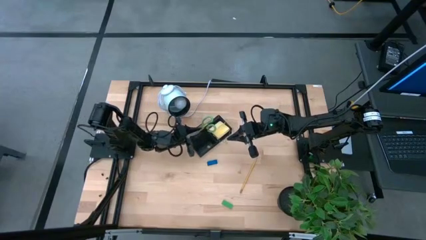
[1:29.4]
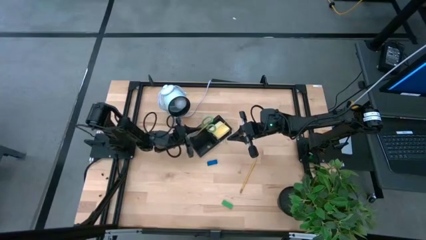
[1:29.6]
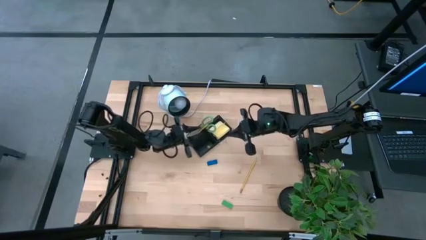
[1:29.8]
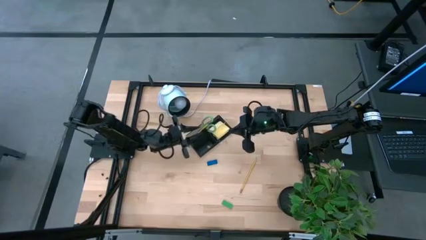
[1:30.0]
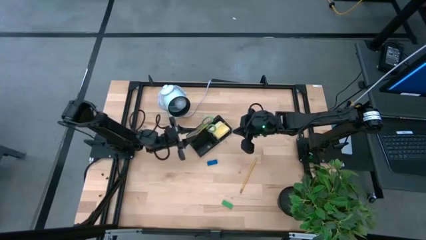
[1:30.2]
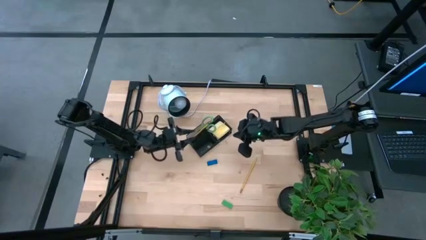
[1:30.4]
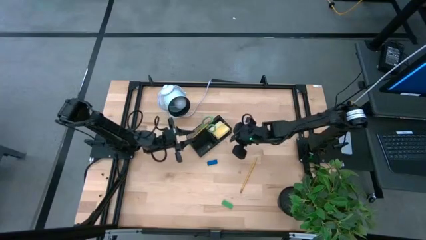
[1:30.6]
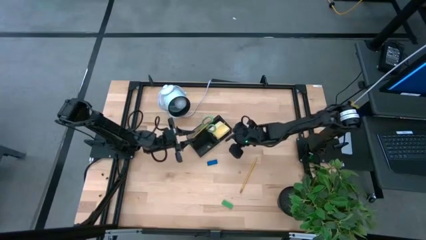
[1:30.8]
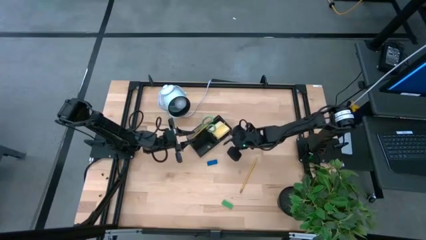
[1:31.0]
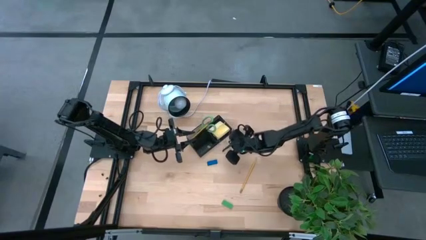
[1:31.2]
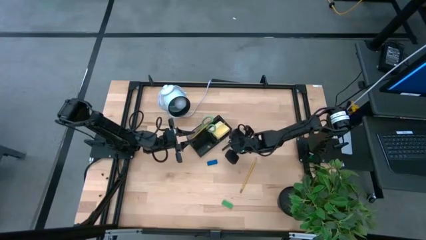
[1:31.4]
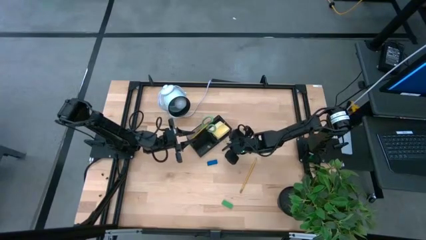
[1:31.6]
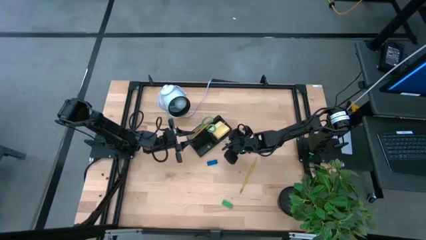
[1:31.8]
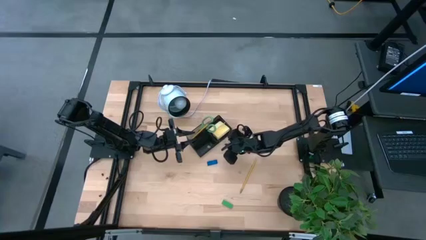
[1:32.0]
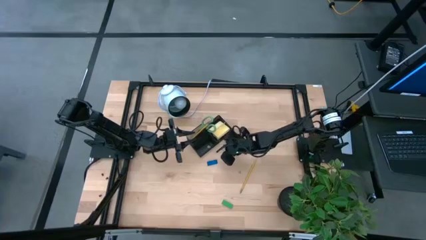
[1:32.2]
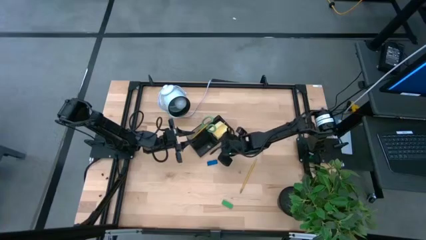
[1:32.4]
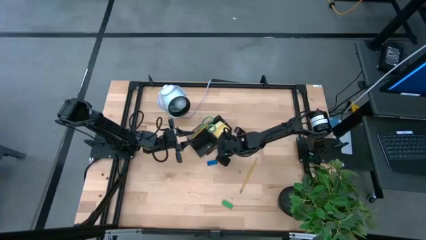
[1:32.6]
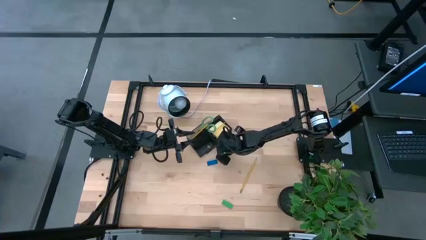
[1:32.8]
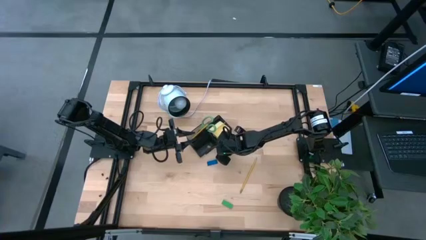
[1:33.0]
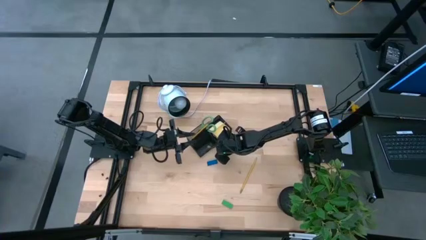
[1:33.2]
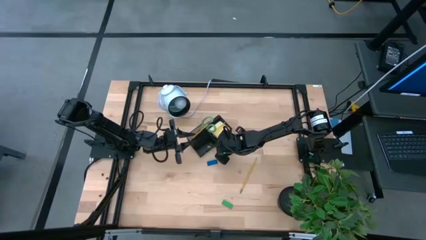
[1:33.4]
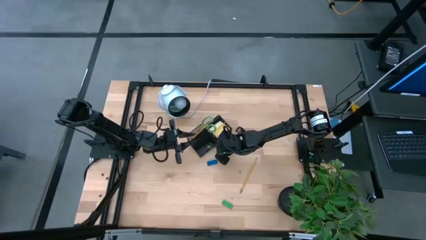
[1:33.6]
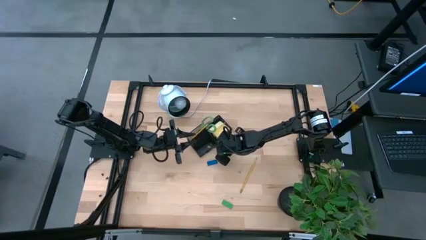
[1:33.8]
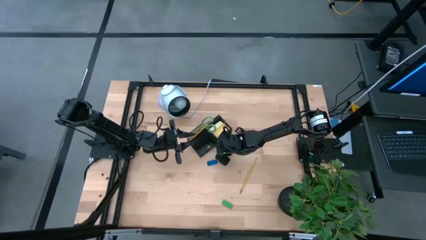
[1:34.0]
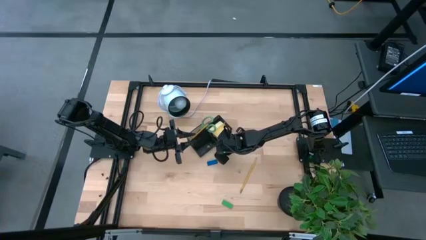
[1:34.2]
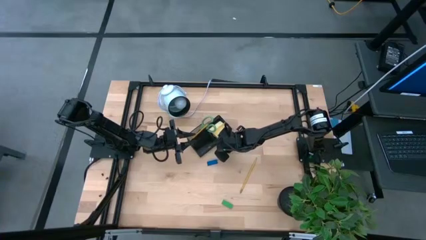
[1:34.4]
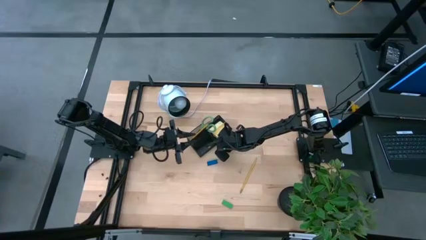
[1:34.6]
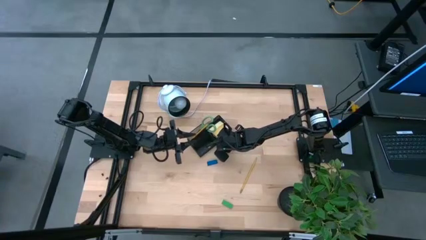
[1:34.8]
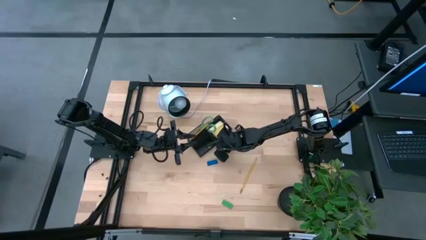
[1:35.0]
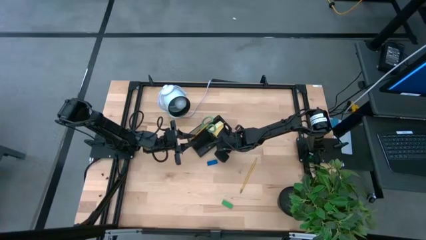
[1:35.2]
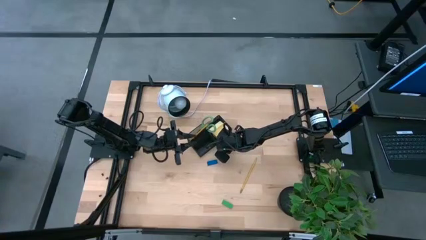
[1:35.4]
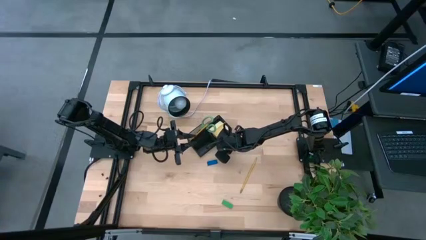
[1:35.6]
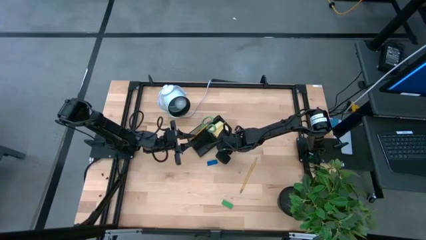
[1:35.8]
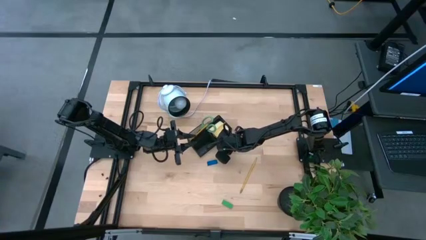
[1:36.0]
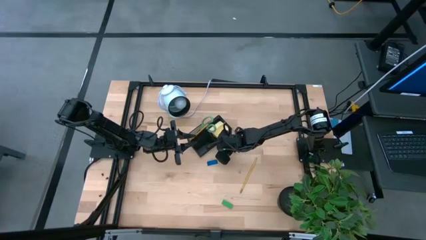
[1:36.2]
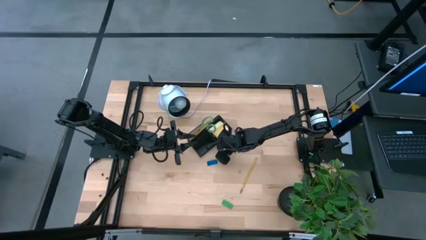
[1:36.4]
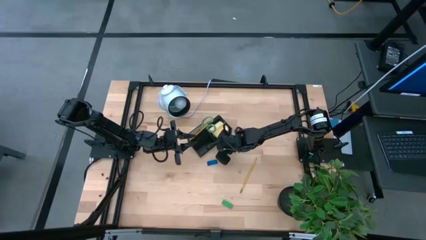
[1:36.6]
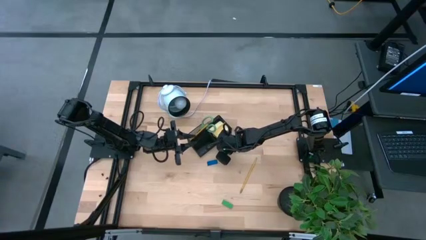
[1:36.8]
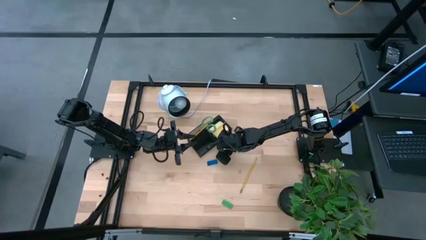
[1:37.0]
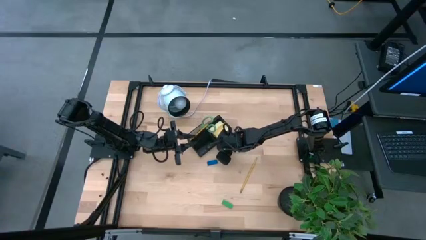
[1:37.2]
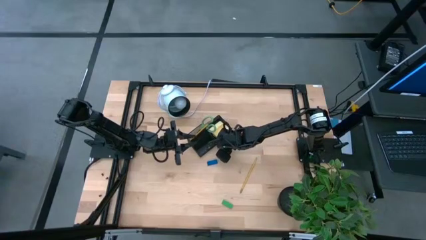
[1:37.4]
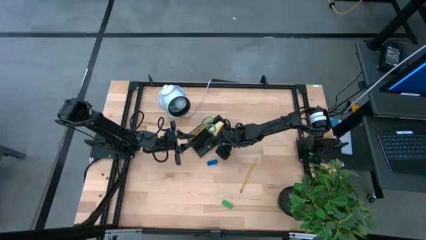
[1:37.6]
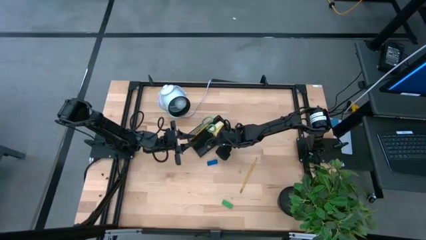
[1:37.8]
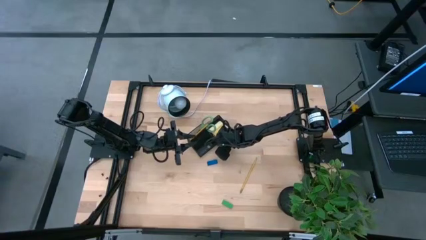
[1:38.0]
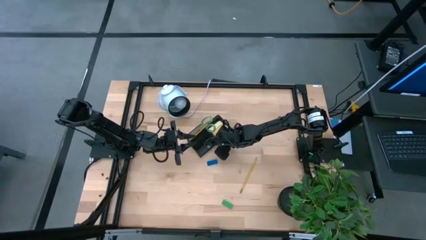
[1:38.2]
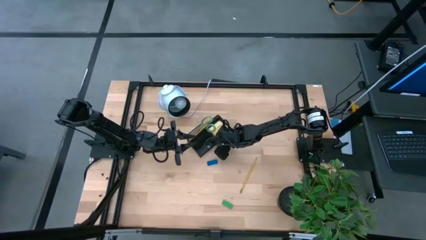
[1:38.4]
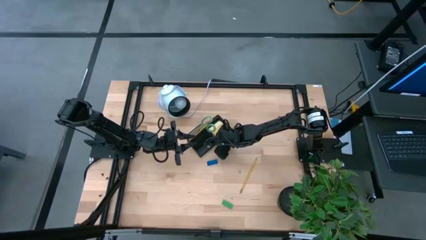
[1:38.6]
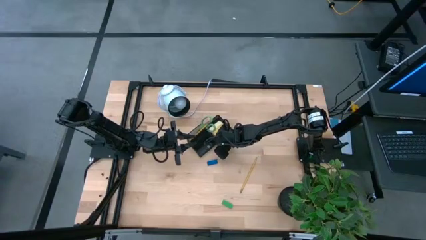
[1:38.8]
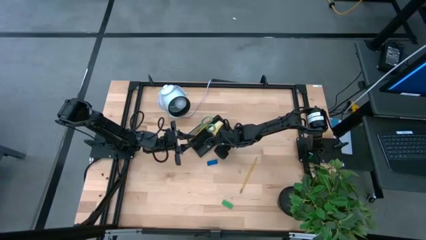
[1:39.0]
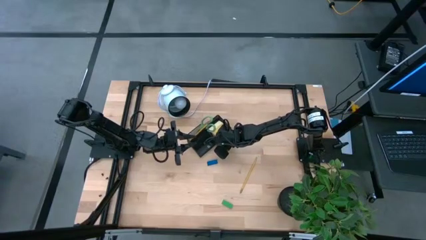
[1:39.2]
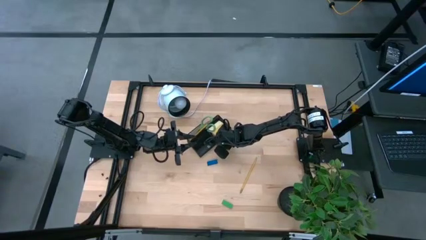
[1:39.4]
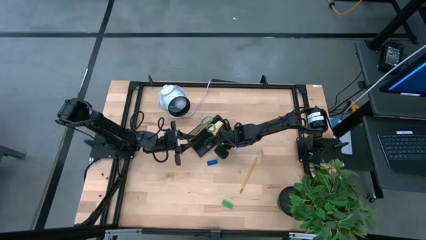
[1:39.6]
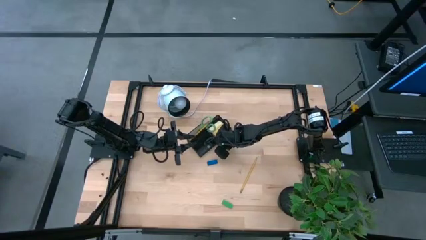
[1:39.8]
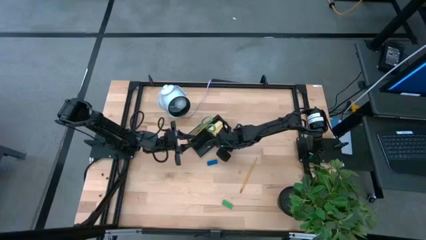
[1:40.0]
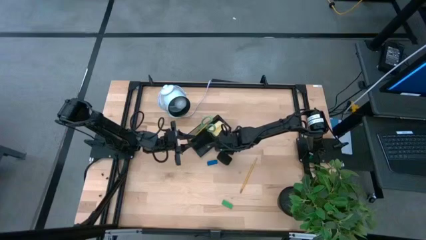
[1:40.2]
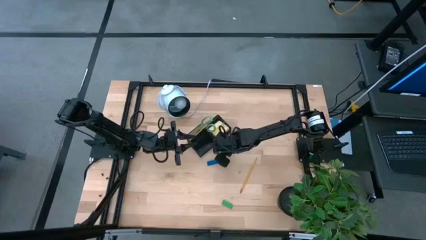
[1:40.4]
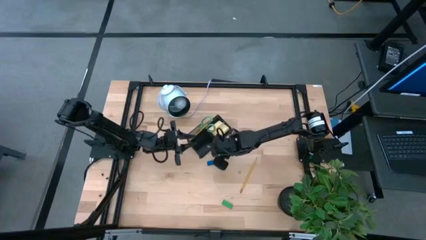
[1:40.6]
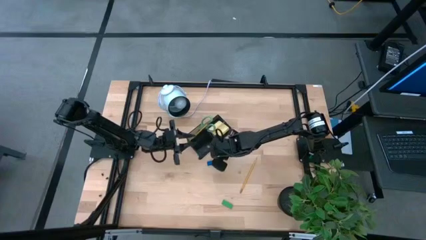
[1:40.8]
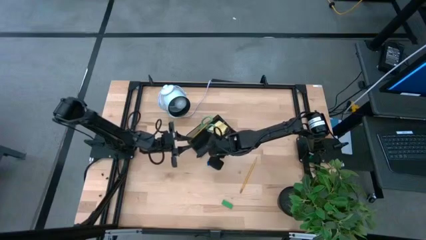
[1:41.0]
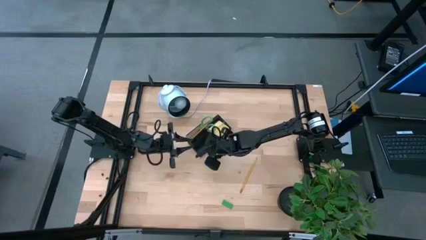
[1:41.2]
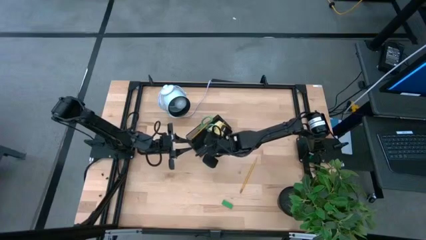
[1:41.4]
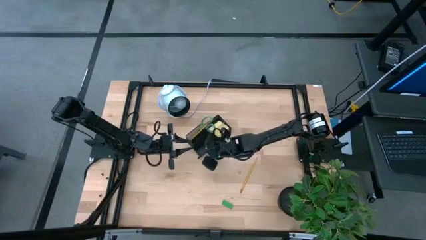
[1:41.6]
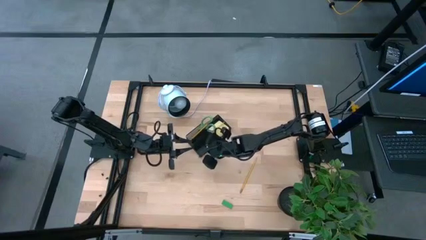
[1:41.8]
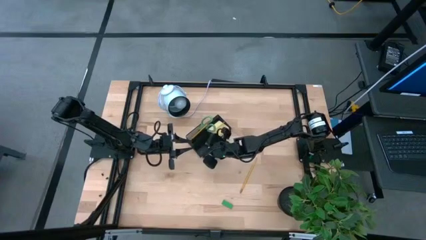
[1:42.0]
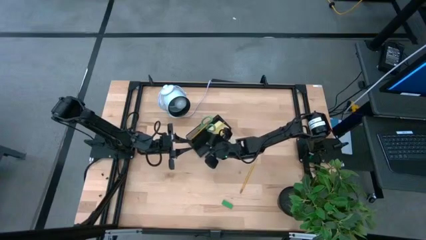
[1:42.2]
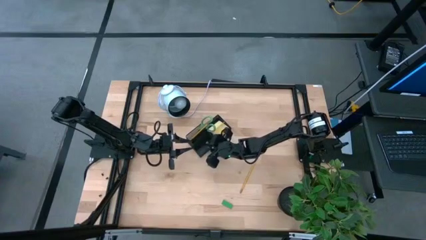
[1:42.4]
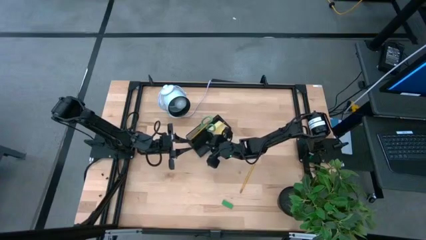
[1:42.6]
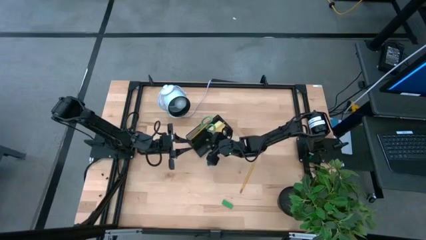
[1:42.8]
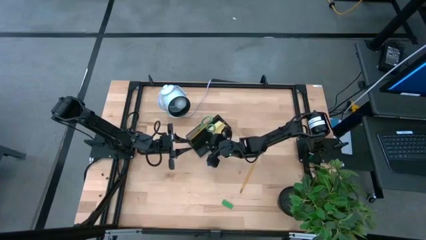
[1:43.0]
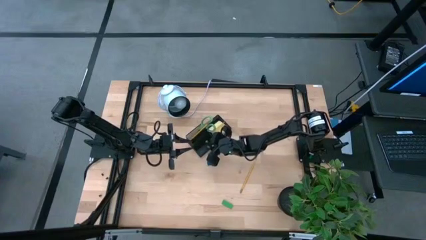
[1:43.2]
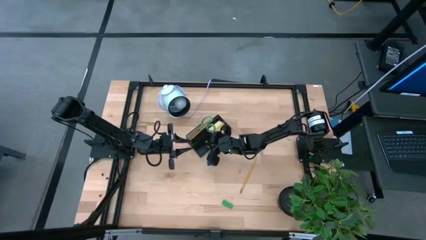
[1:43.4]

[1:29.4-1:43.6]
Task: Pick and place office supplies into organizer
Put the gold binder clip into the black desk organizer
